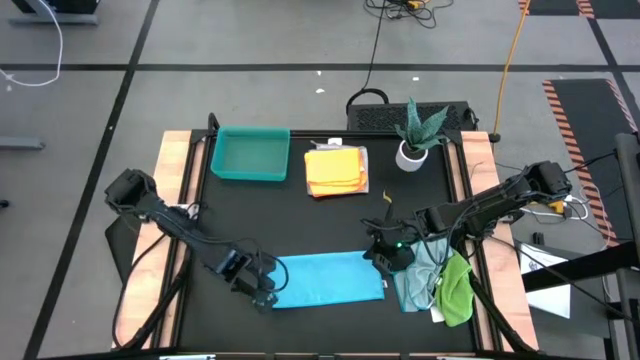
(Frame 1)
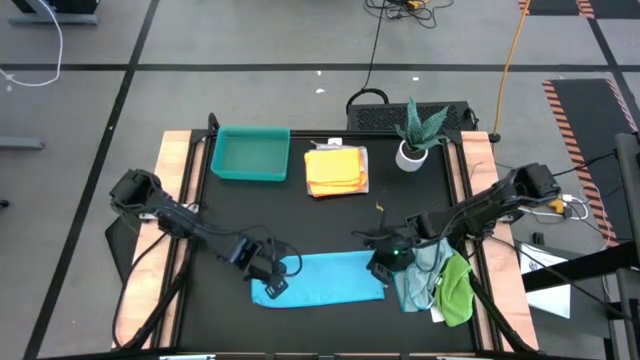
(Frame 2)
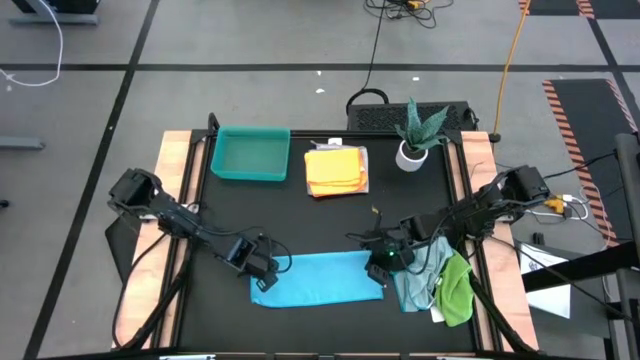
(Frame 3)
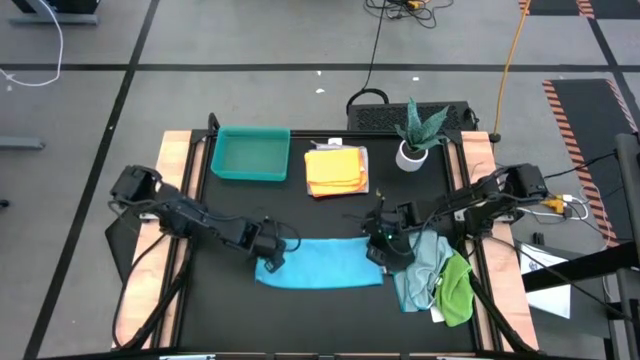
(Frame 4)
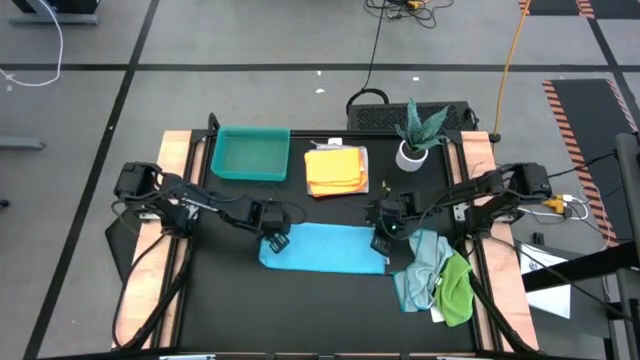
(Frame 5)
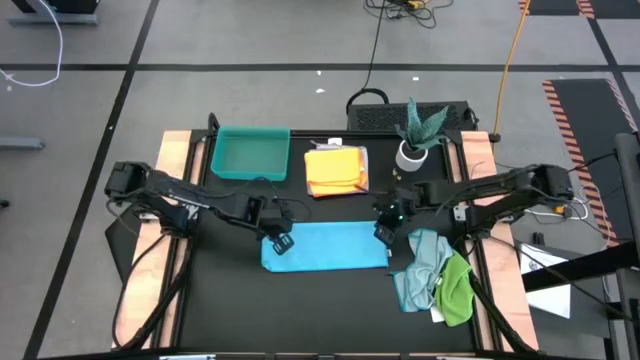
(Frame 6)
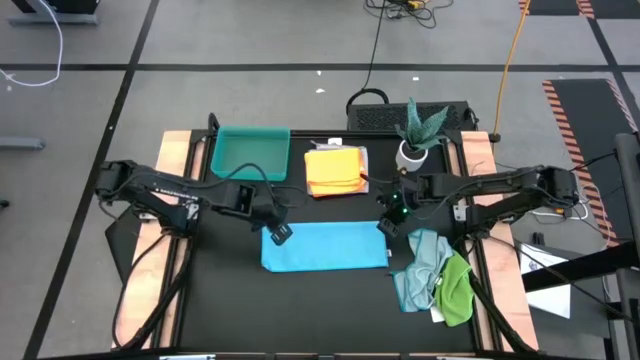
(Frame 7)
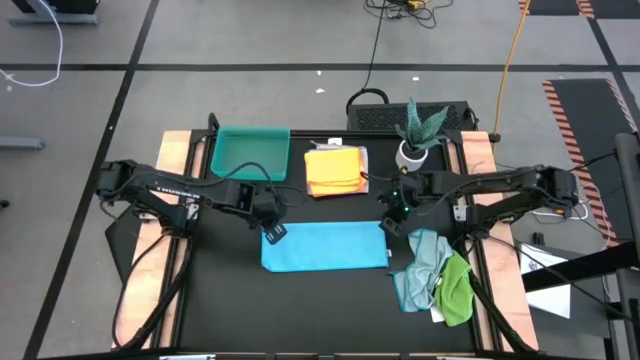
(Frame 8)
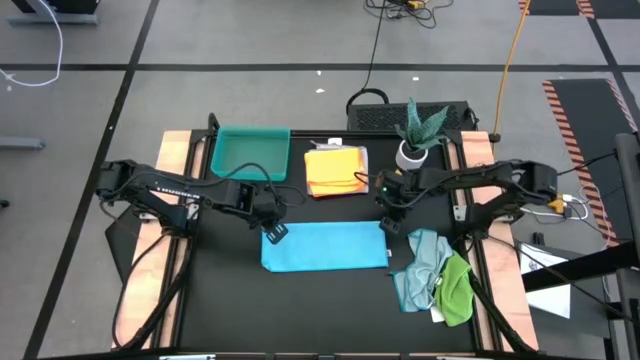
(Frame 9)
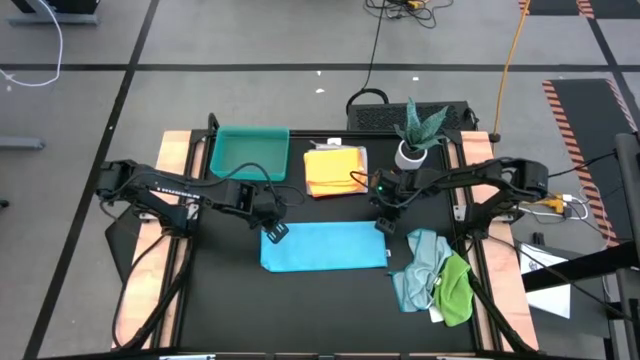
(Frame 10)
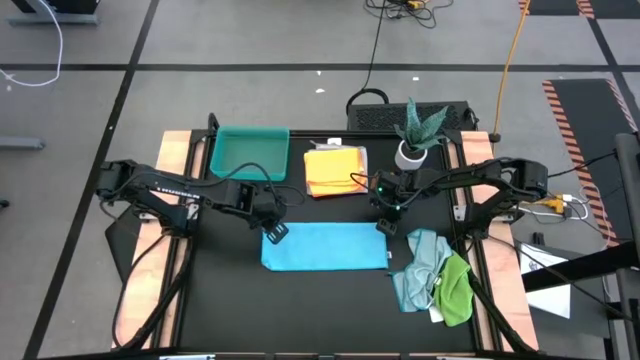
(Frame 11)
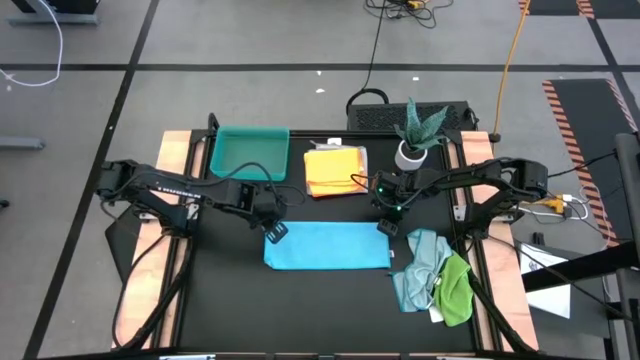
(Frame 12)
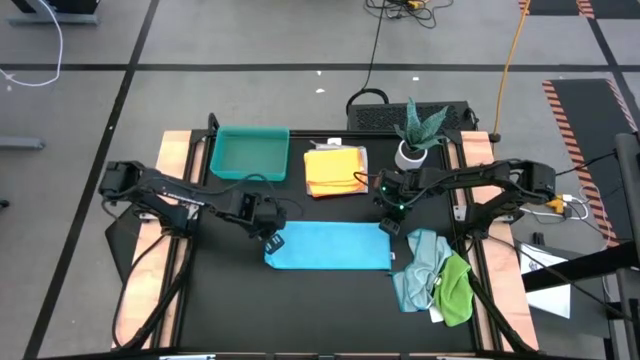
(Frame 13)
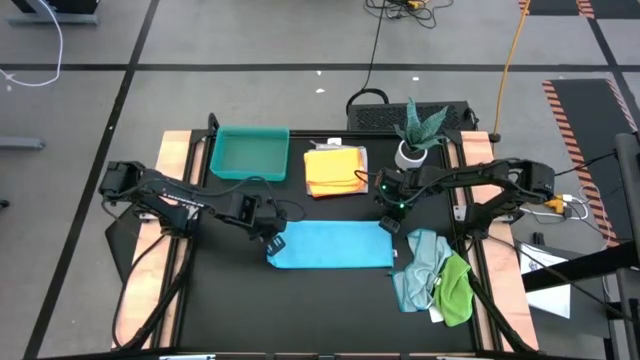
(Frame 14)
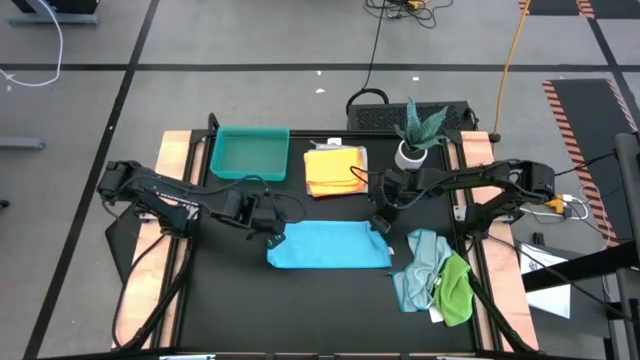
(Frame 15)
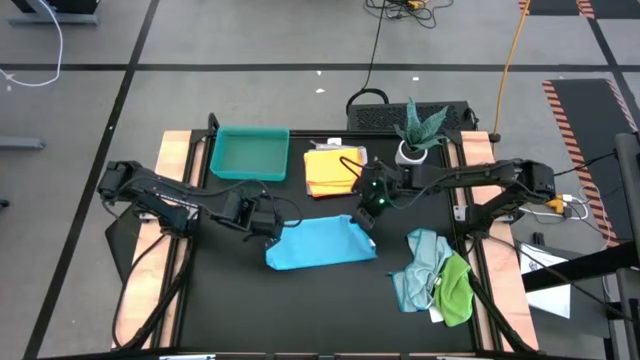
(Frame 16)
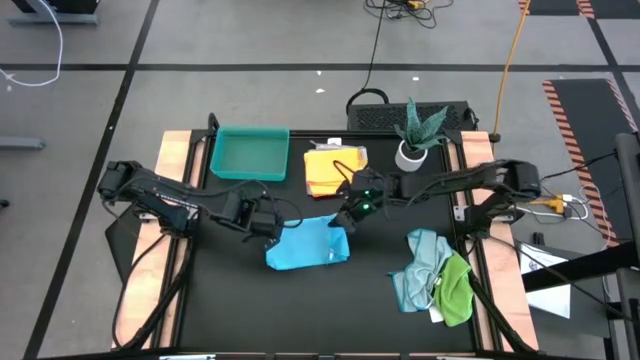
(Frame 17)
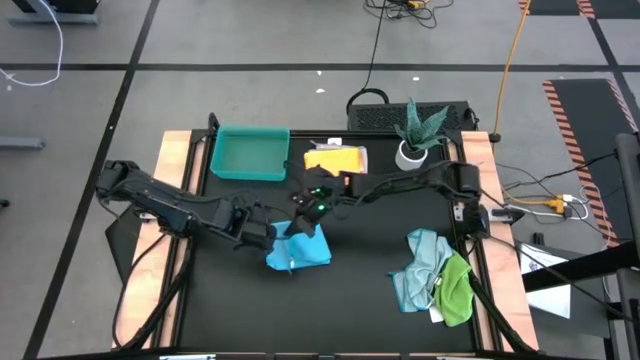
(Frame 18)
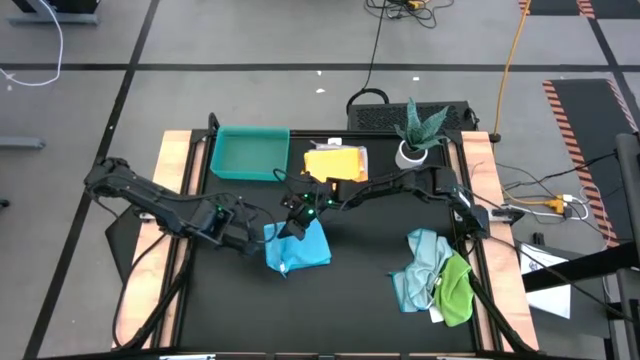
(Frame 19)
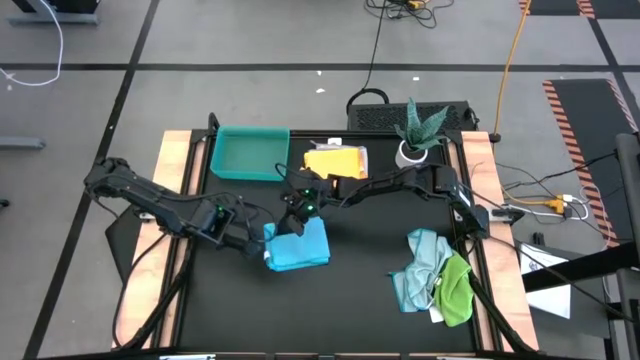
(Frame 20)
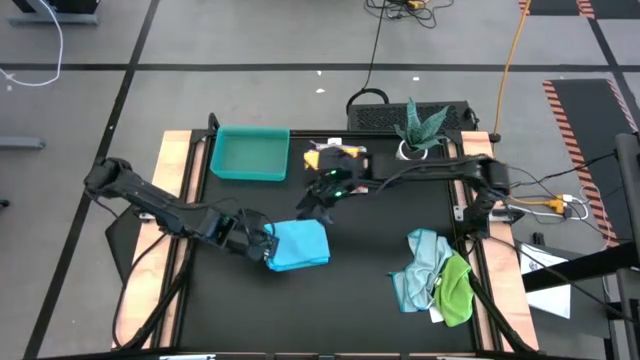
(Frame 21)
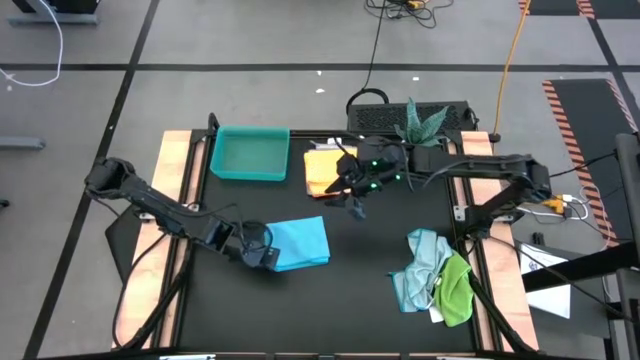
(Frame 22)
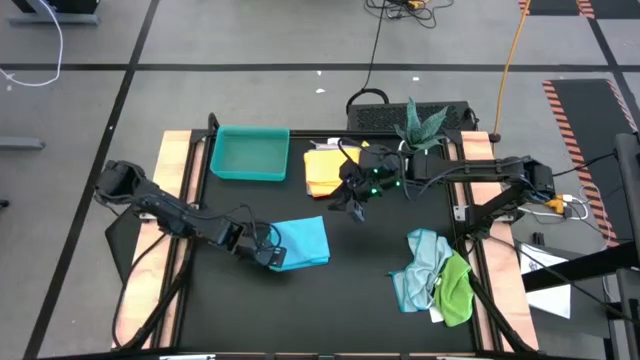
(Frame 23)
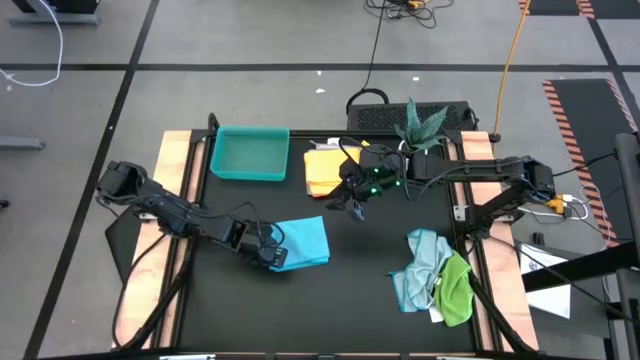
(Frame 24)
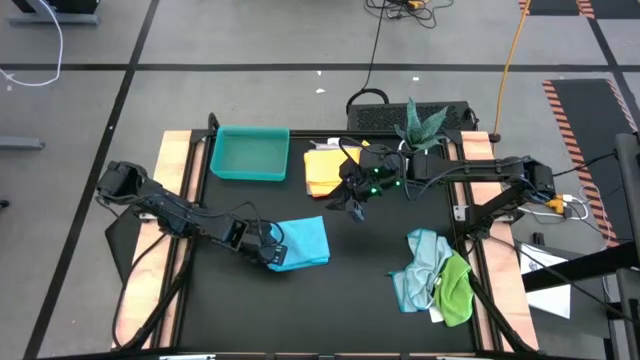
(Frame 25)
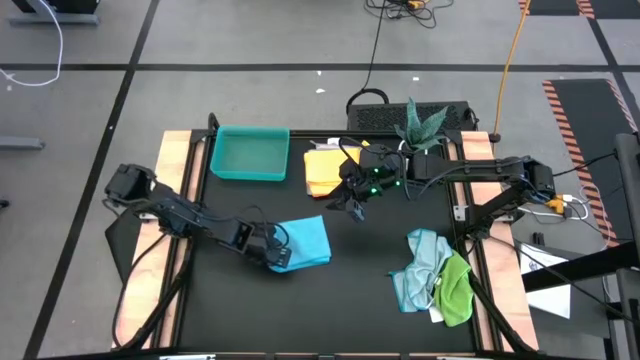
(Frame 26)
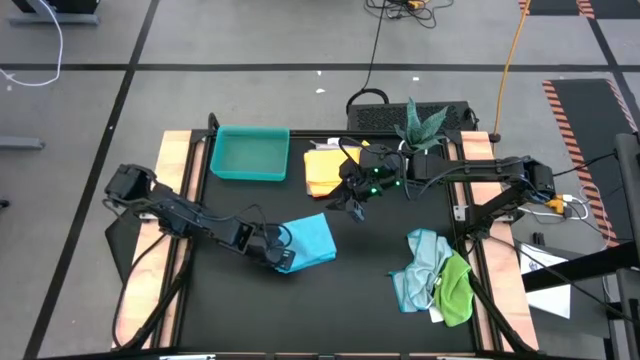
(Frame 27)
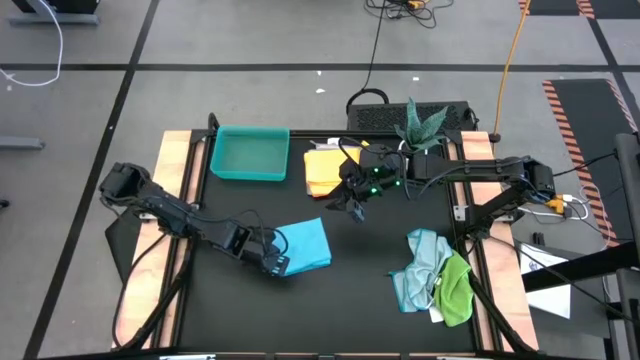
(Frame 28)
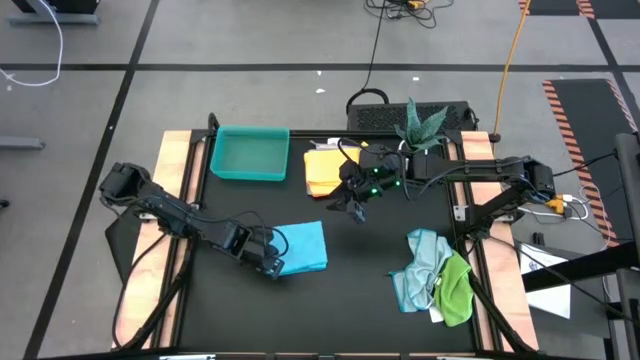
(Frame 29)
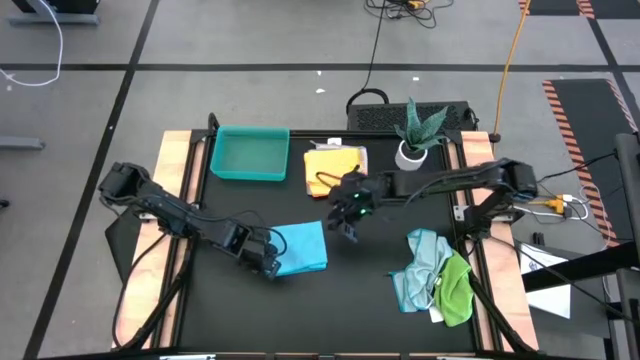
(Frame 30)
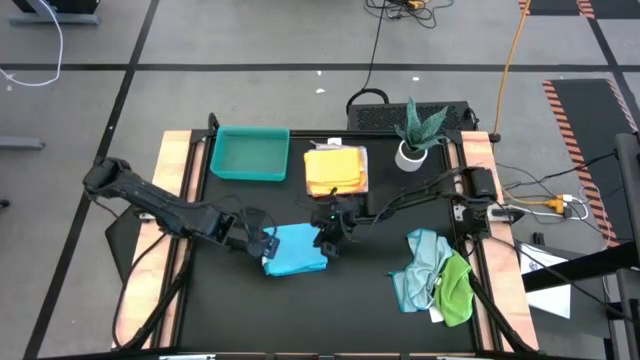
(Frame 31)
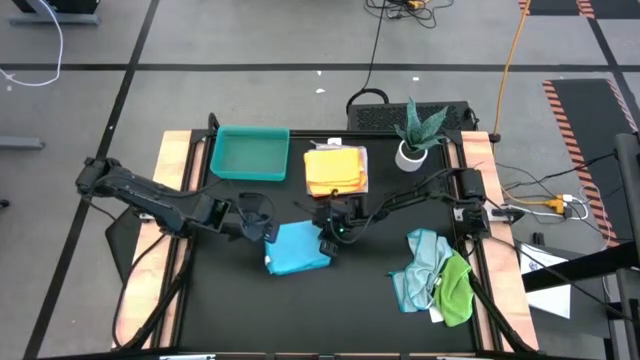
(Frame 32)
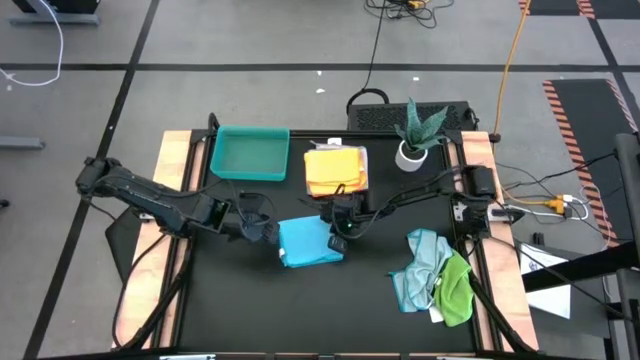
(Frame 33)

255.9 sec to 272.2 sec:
Task: Fold microfiber towels
Fold the blue microfiber towel

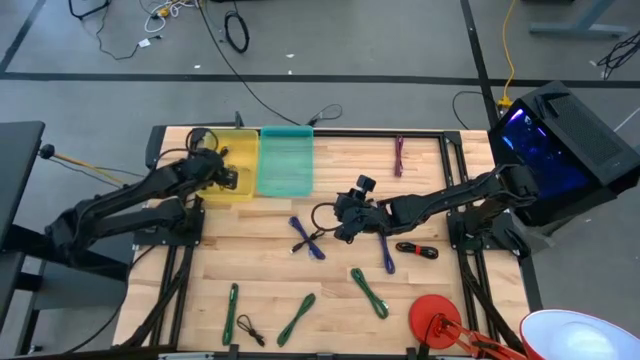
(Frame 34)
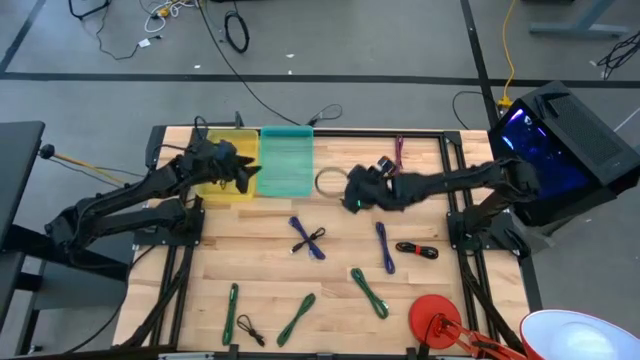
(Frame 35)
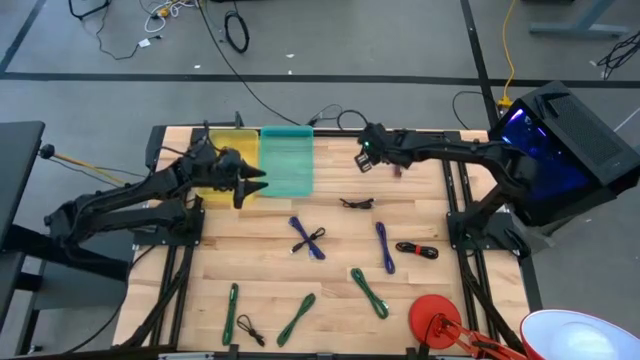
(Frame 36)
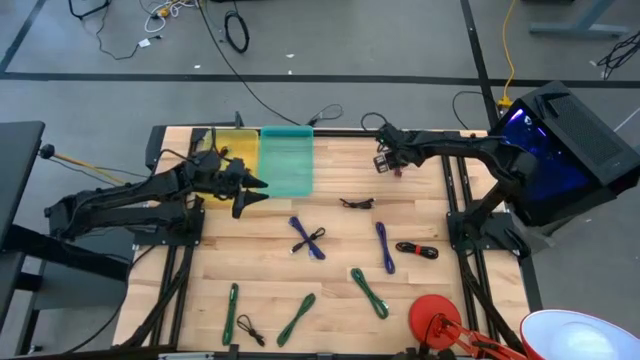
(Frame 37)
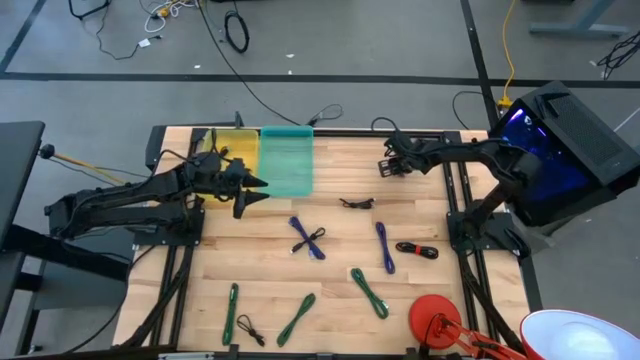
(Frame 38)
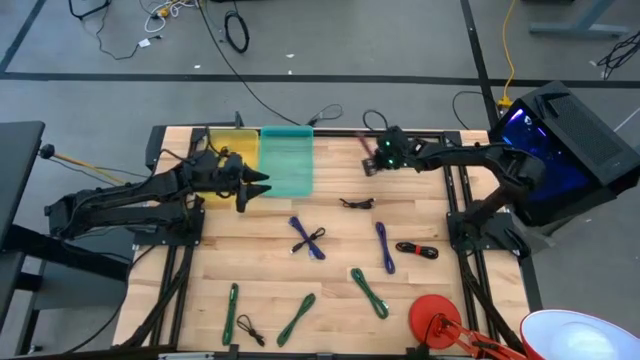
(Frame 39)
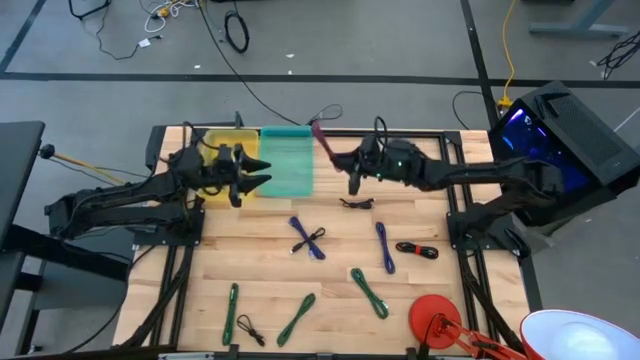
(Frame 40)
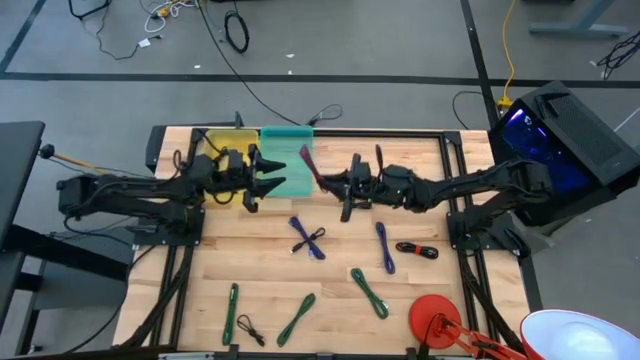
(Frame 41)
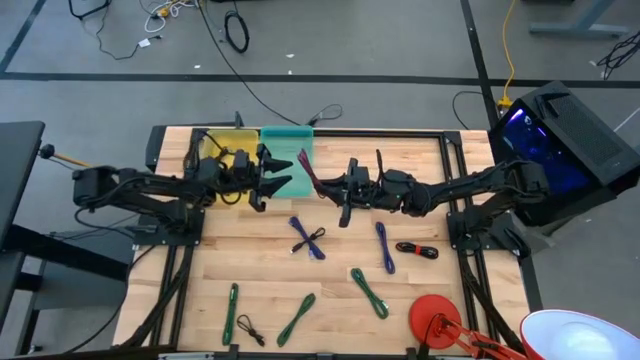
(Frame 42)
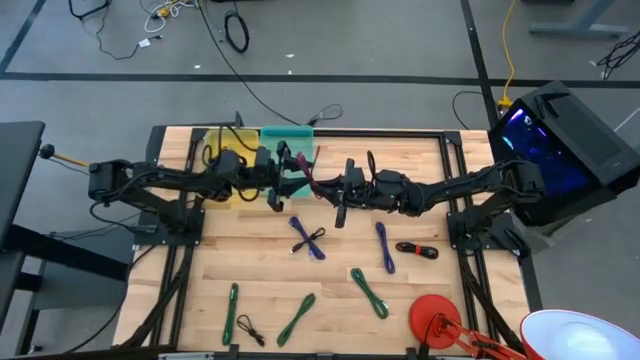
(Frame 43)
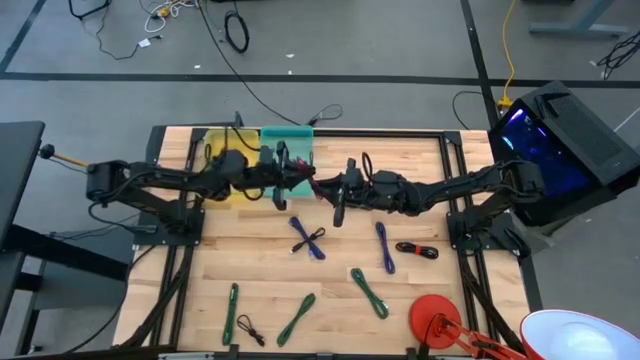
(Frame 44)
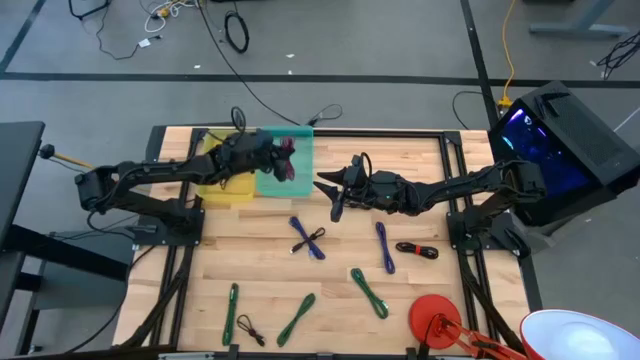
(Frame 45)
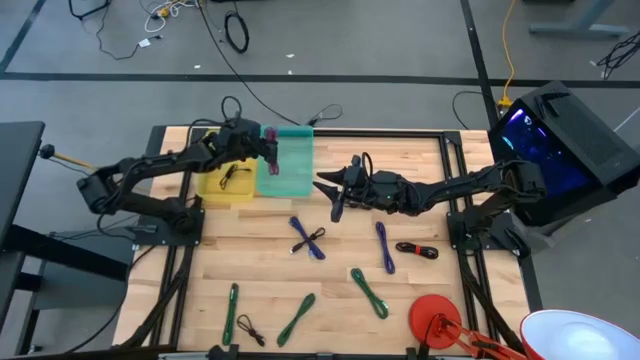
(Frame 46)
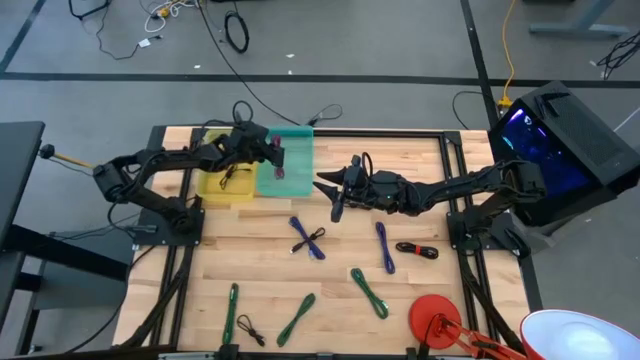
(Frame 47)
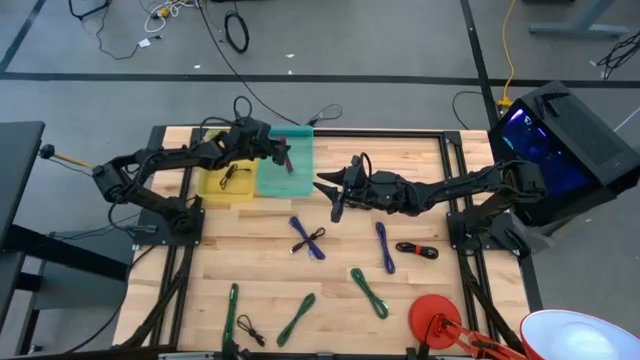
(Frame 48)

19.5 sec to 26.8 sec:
Task: Pick & Place USB Port
Put the pink charger cable into the green bin
